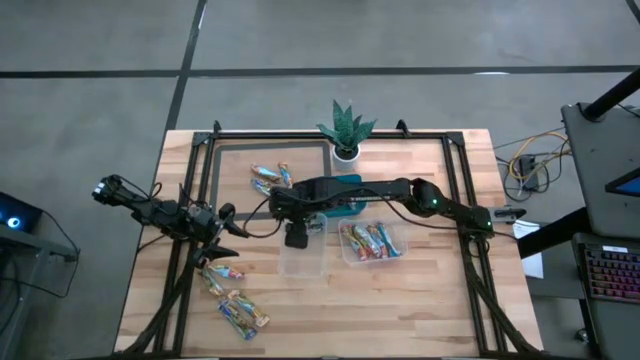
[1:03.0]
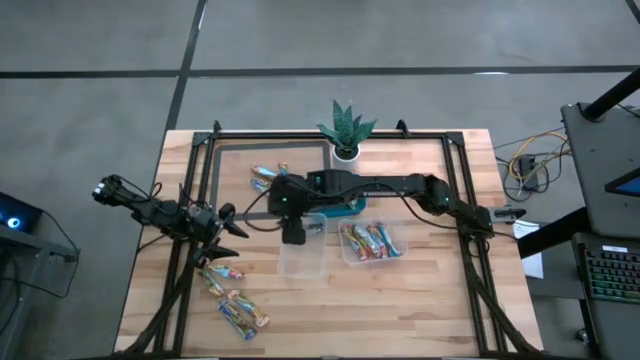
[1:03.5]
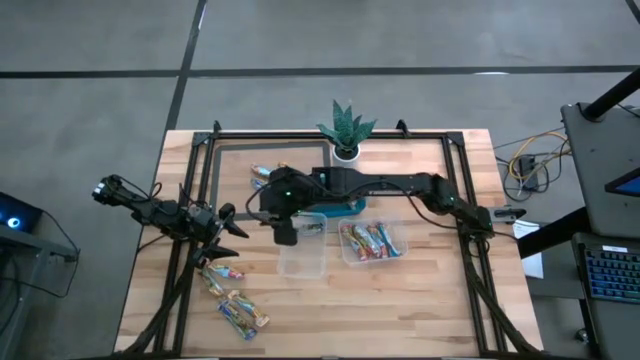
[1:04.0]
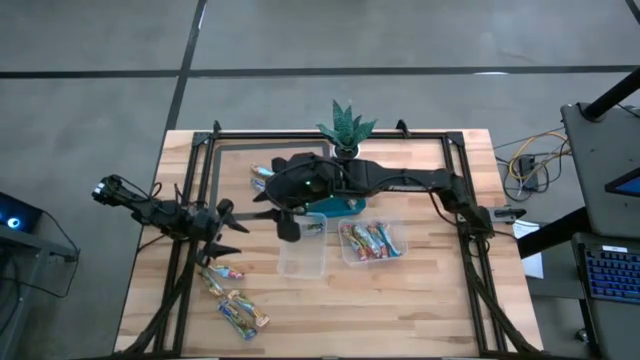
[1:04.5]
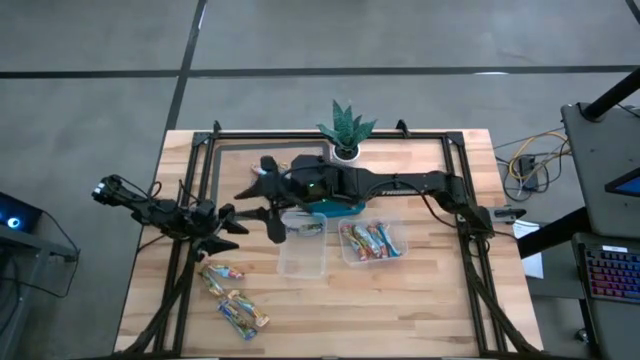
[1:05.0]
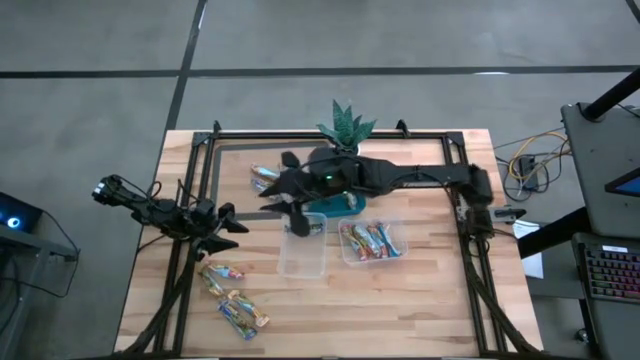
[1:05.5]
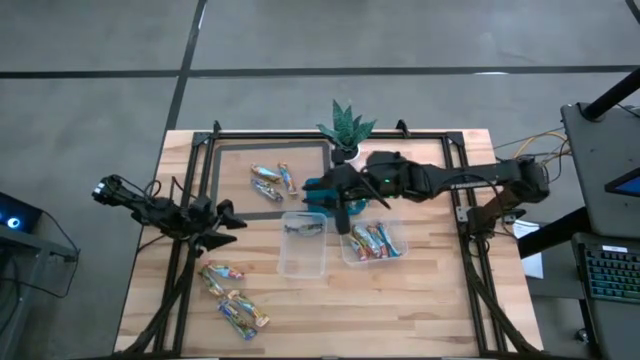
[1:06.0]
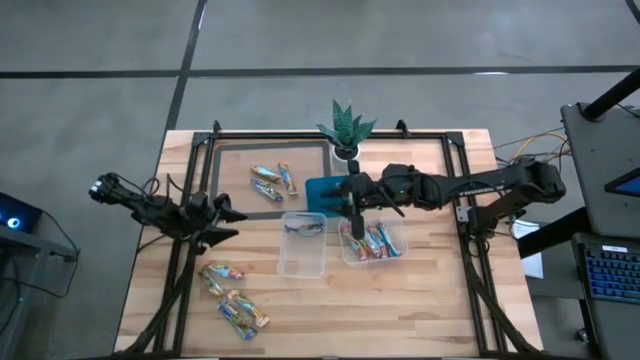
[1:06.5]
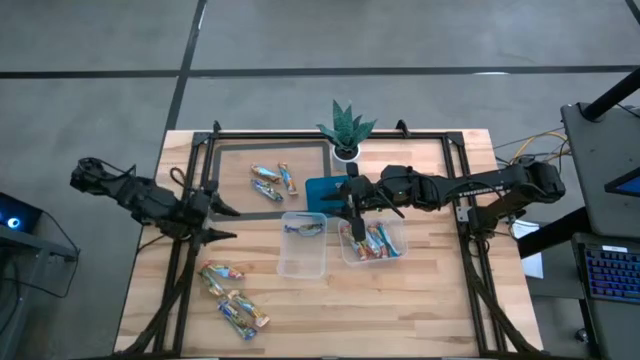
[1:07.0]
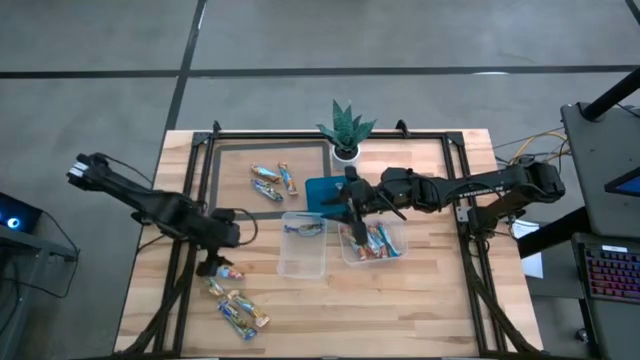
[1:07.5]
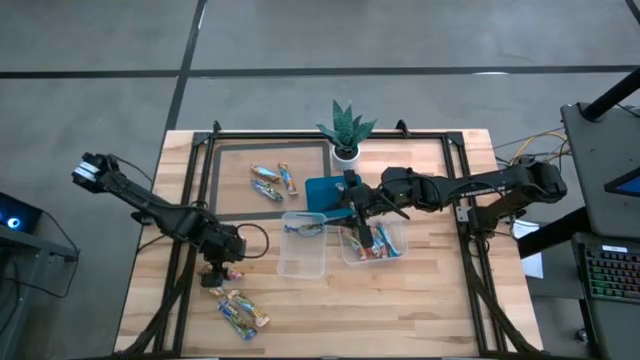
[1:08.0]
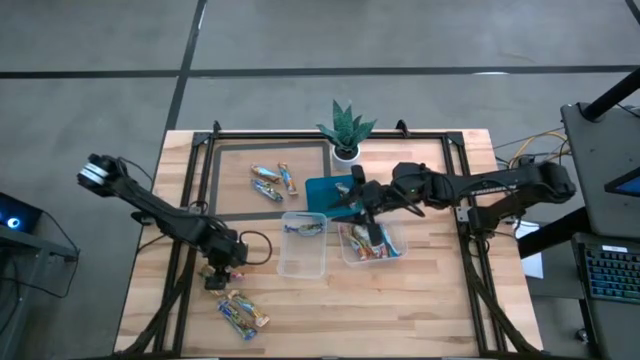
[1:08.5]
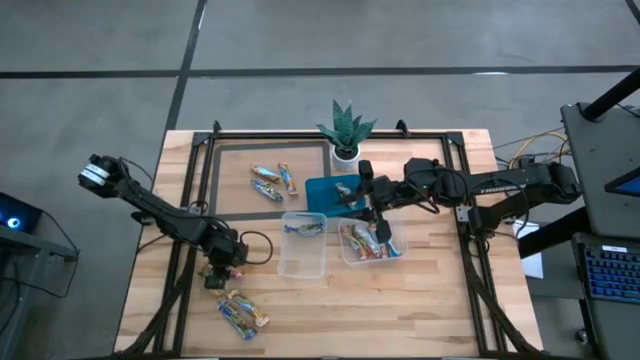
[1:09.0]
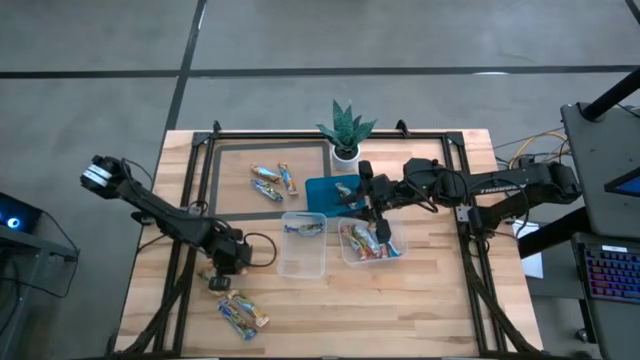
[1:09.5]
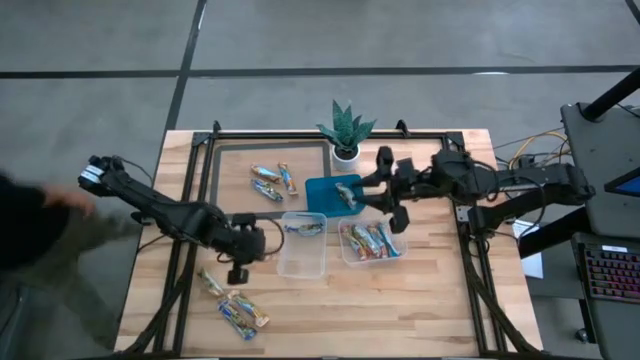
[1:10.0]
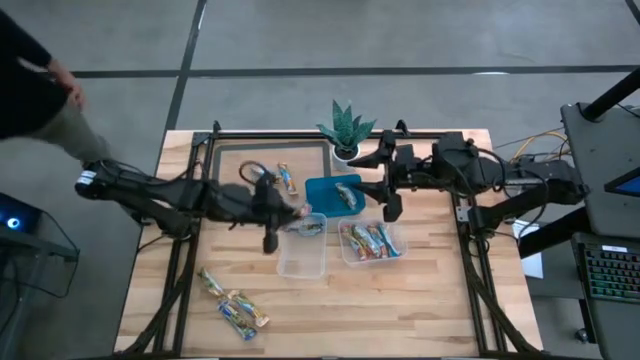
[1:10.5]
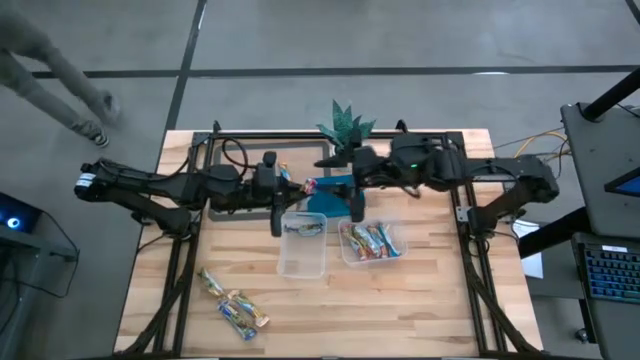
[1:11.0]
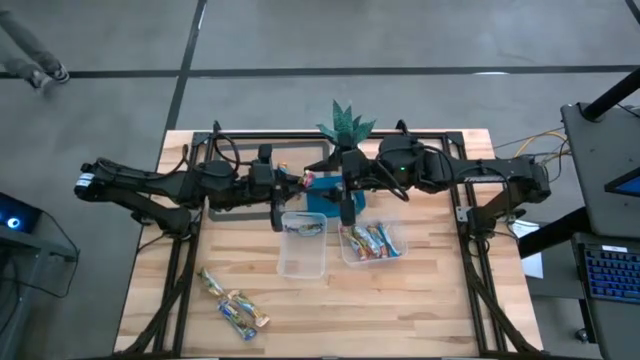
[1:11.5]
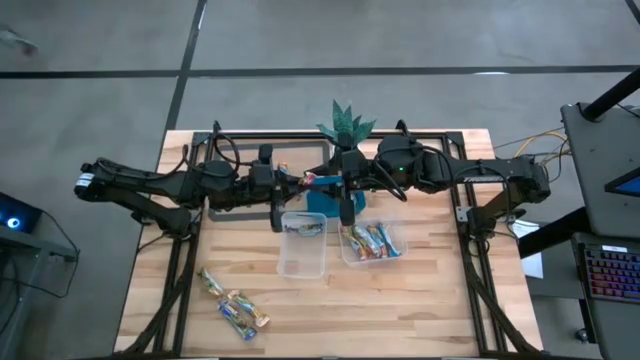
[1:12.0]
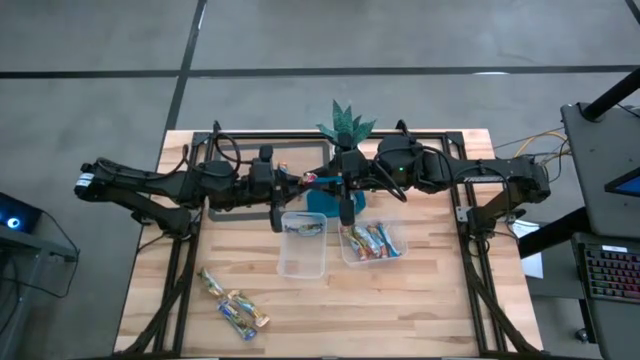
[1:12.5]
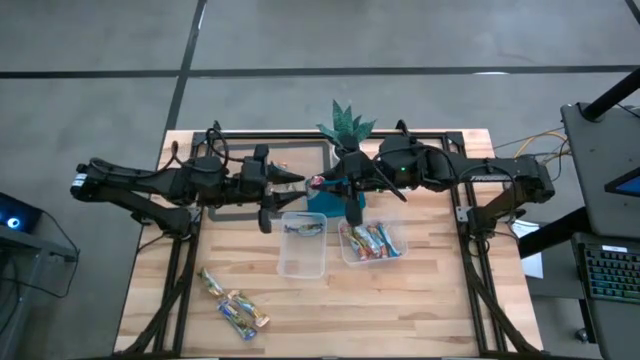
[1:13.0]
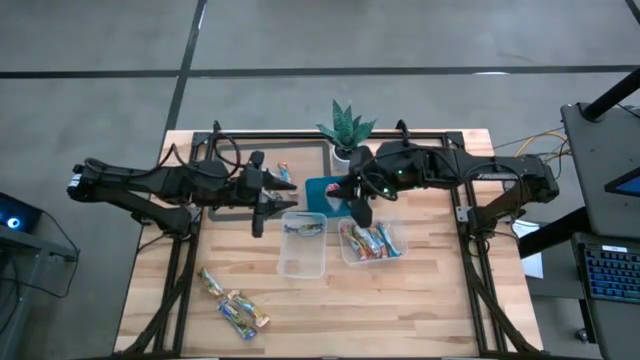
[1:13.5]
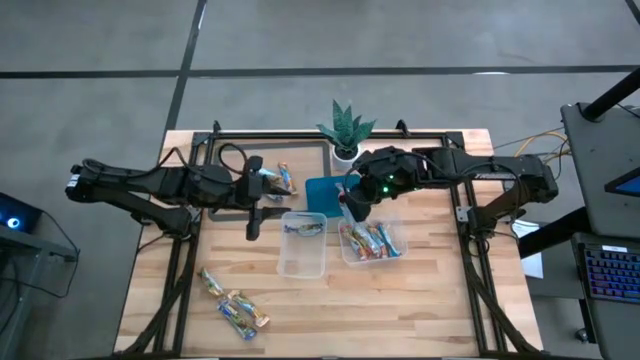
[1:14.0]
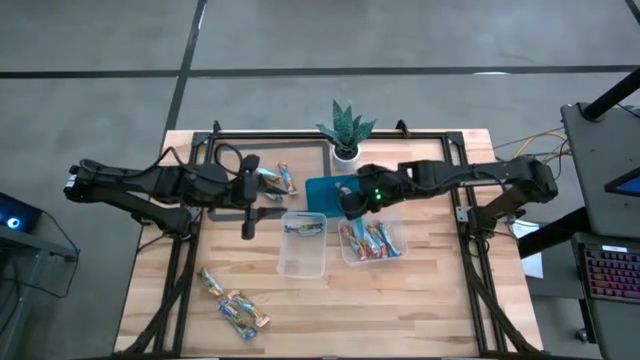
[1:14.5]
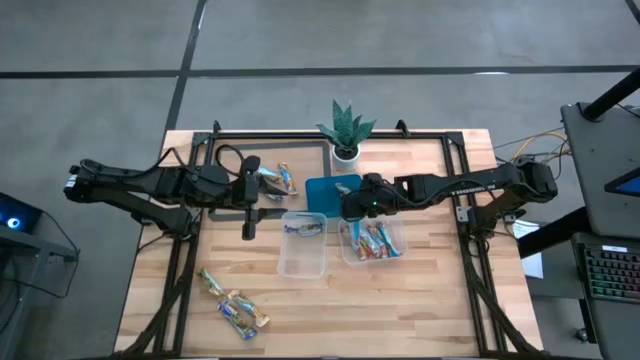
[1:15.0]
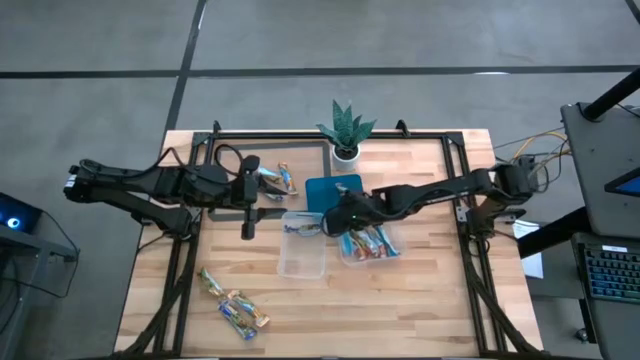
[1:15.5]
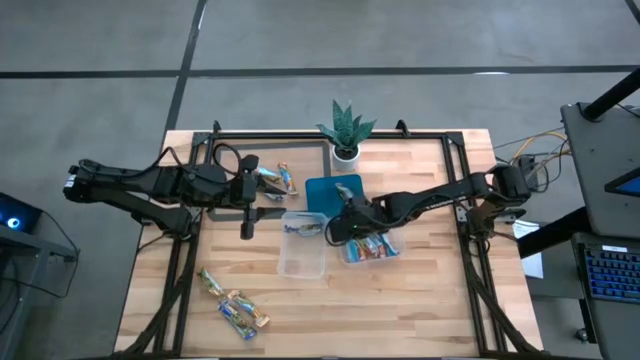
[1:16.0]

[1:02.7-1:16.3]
Task: Pick and place Granola Bars by type
Put the red granola bar into the right transparent bin

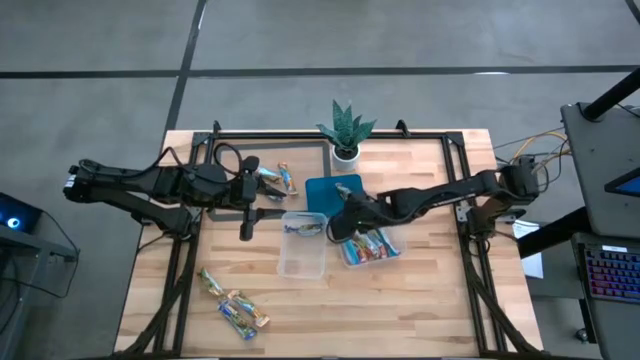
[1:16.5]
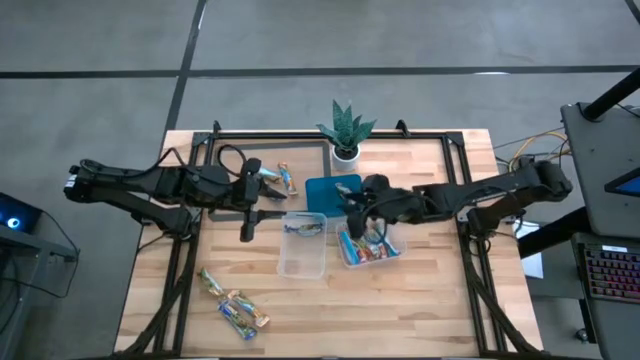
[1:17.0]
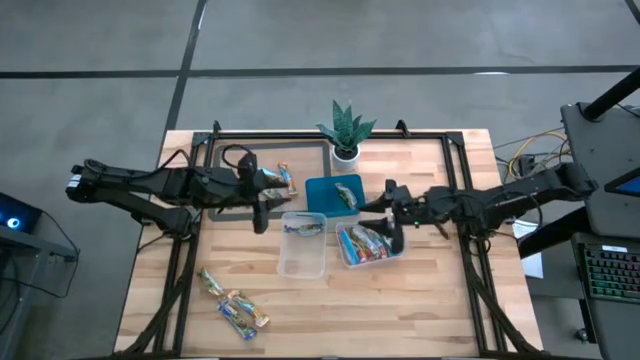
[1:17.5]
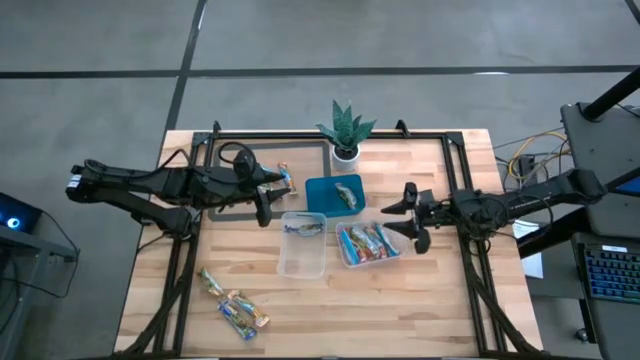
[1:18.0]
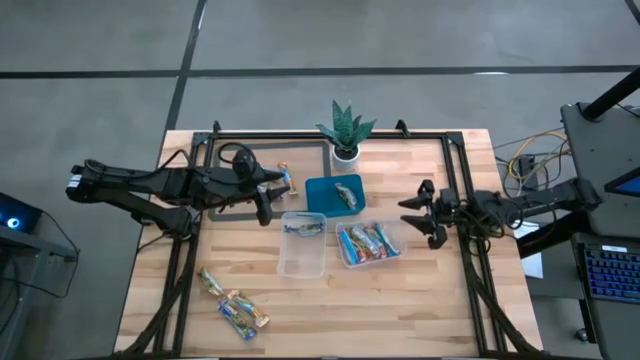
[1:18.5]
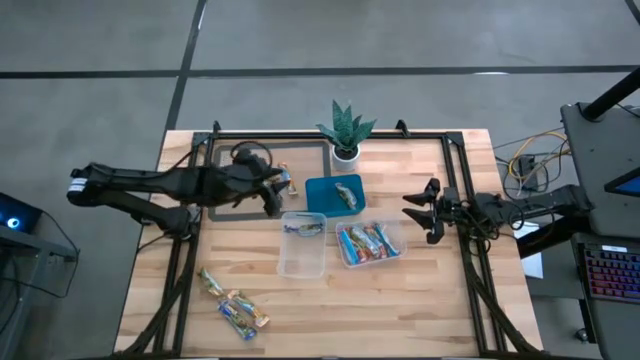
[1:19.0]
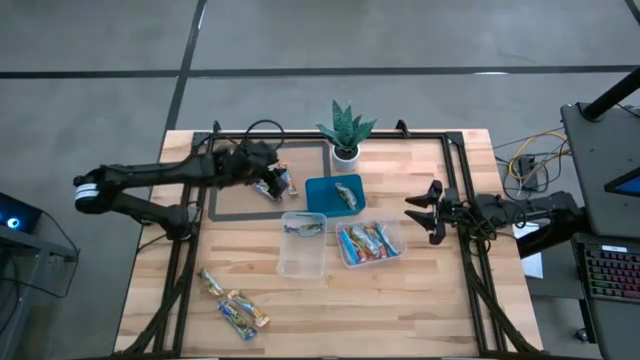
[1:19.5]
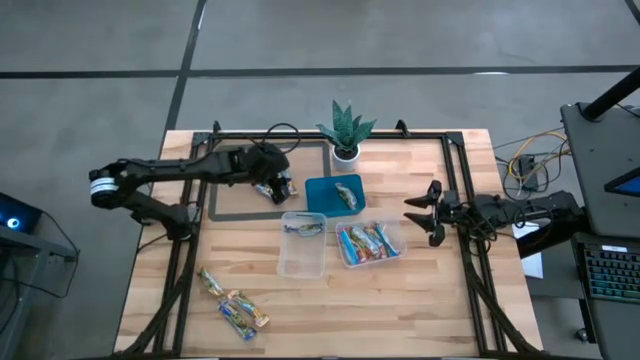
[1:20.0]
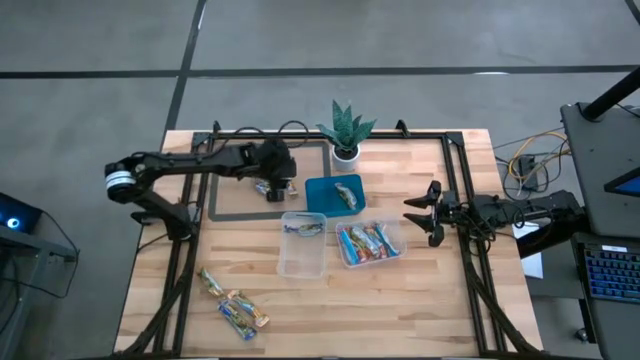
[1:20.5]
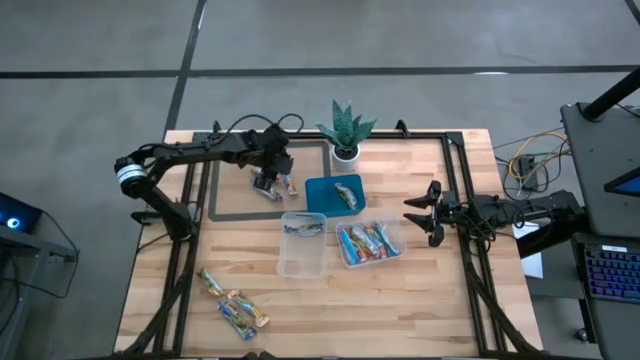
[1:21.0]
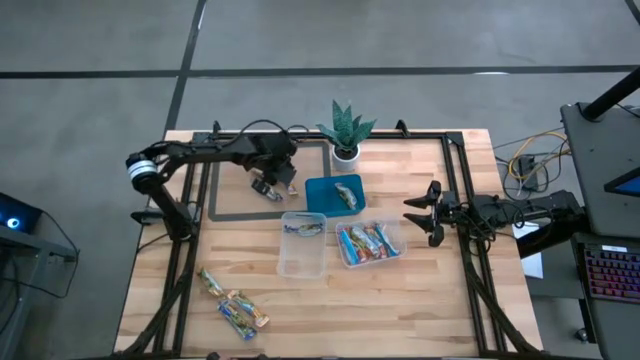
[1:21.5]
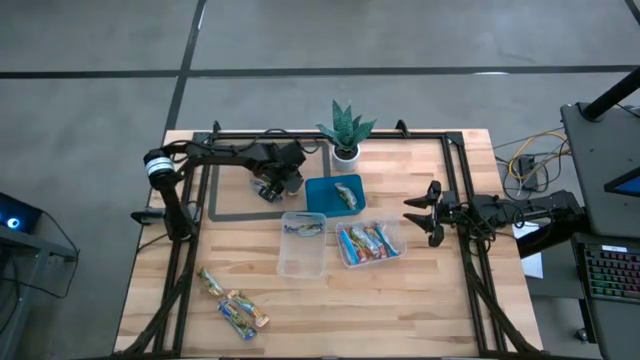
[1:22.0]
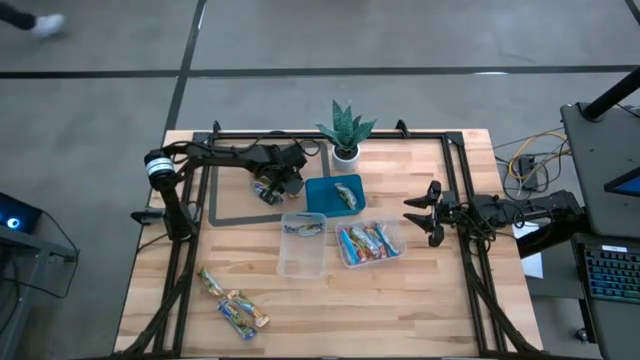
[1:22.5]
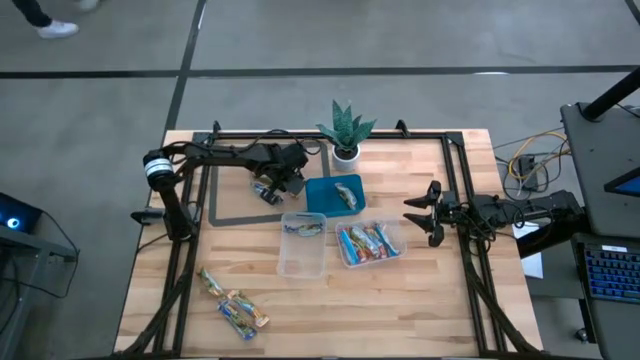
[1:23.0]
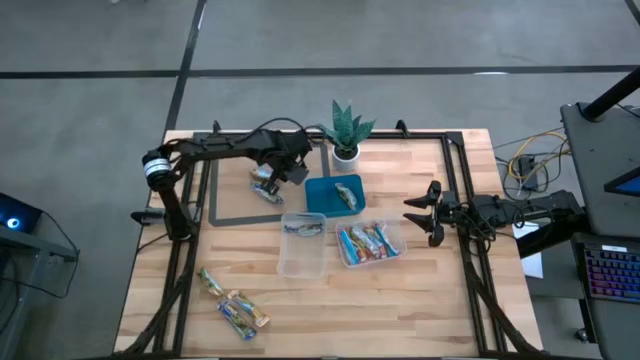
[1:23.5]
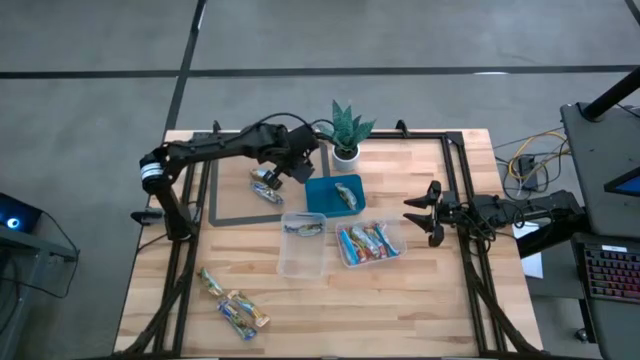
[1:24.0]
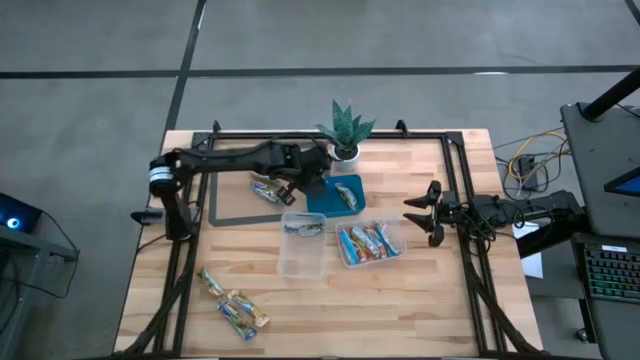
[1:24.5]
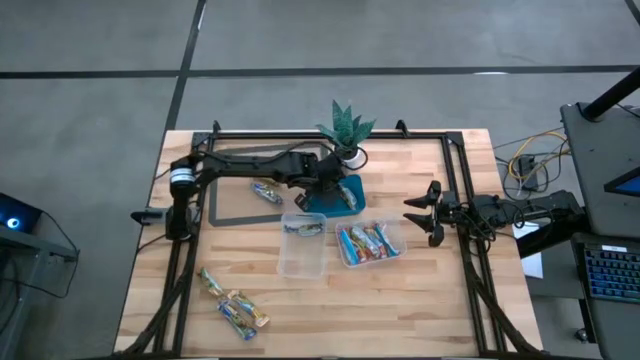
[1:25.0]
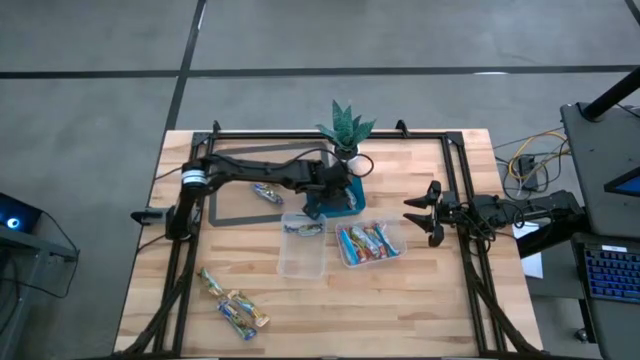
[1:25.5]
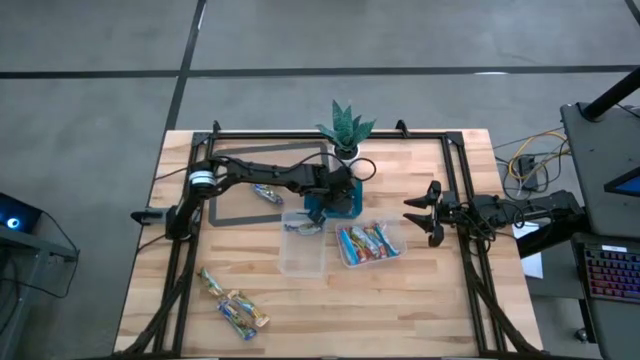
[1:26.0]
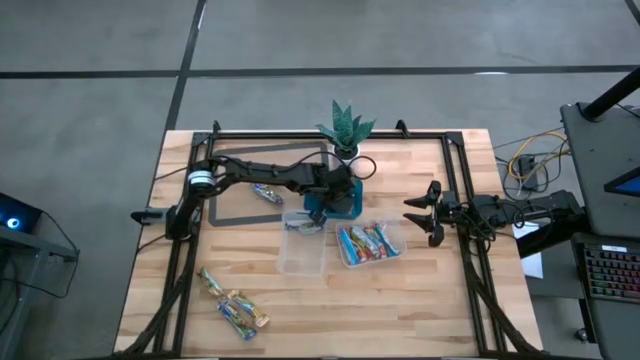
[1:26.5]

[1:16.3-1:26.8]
Put the yellow granola bar into the blue bin
